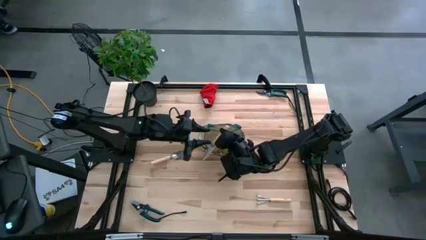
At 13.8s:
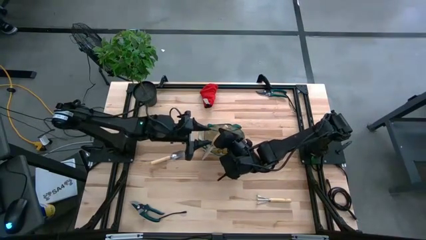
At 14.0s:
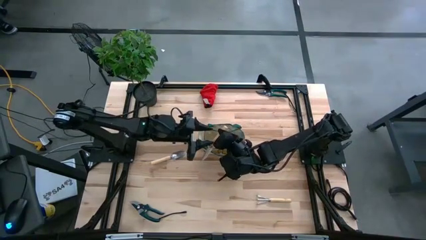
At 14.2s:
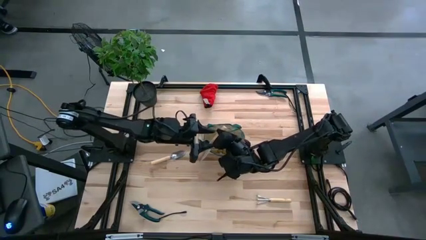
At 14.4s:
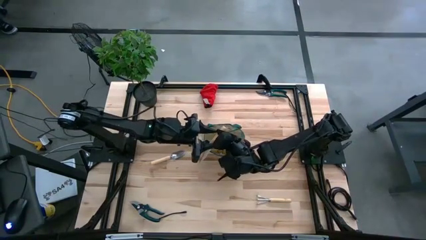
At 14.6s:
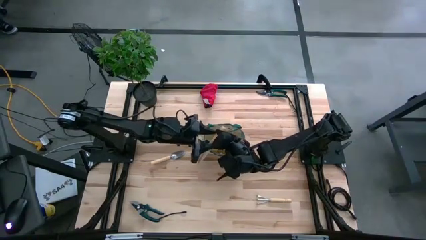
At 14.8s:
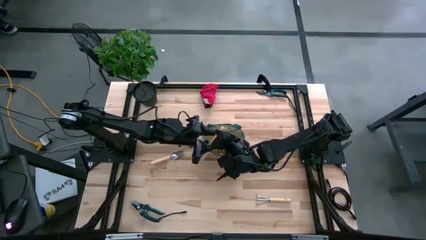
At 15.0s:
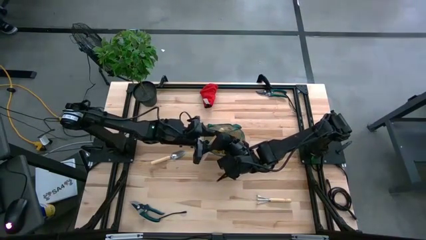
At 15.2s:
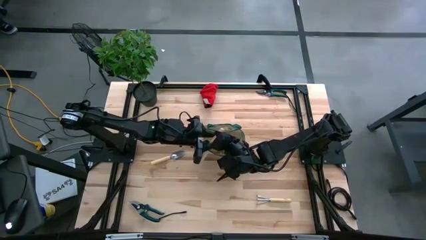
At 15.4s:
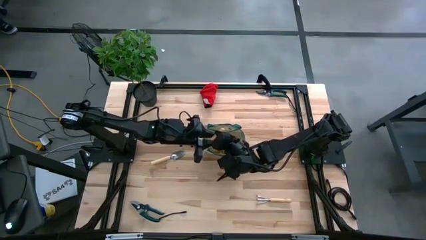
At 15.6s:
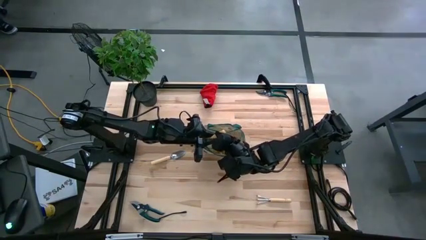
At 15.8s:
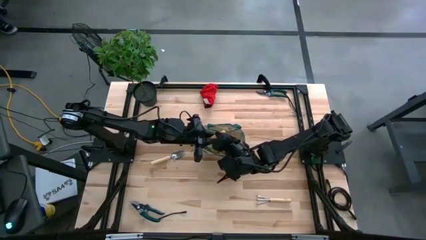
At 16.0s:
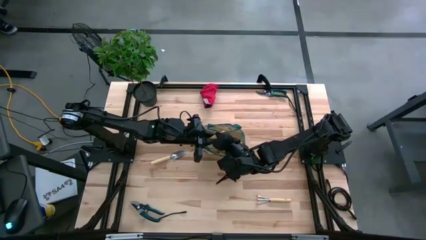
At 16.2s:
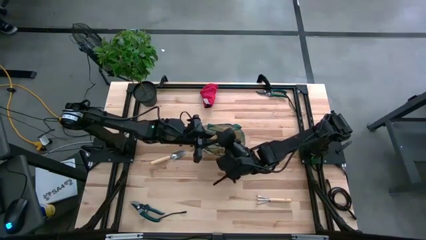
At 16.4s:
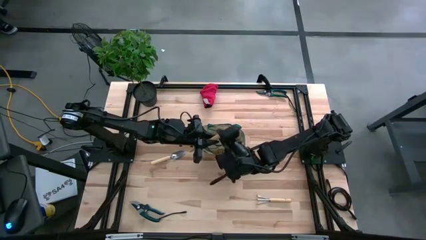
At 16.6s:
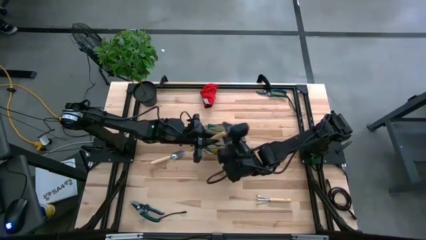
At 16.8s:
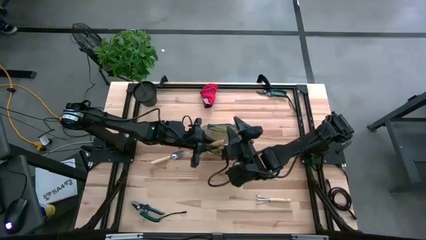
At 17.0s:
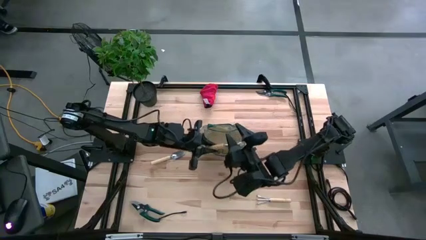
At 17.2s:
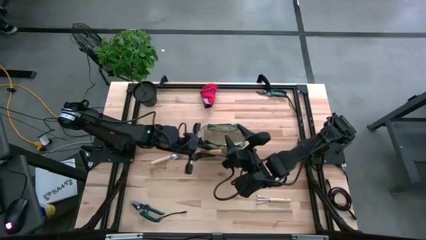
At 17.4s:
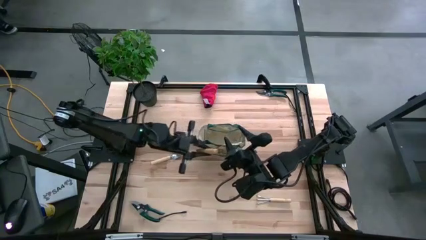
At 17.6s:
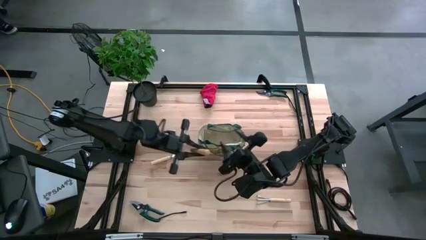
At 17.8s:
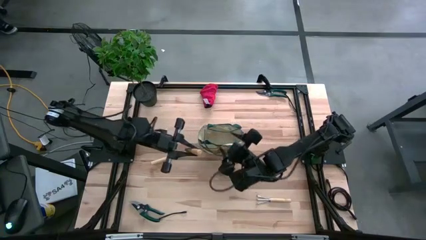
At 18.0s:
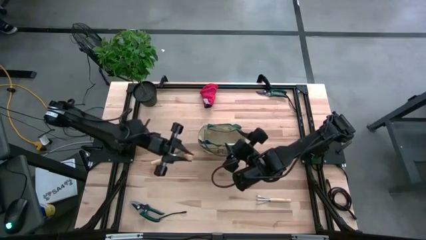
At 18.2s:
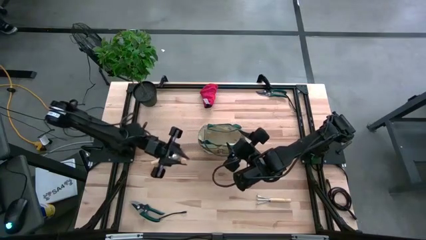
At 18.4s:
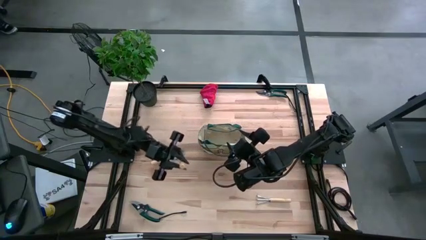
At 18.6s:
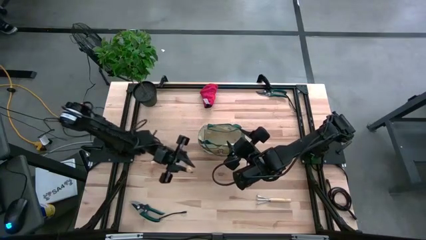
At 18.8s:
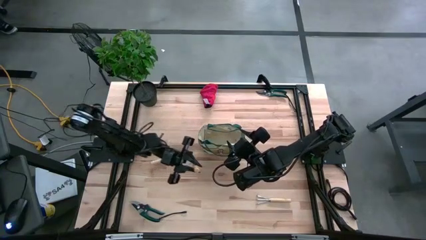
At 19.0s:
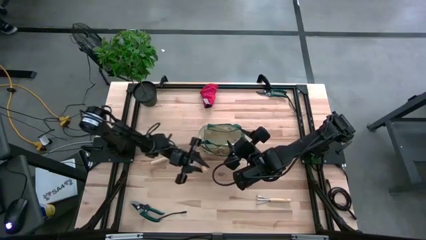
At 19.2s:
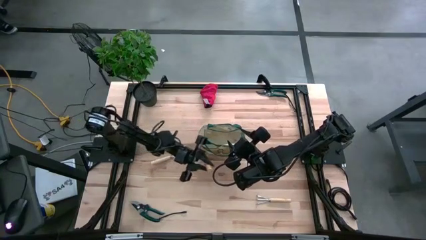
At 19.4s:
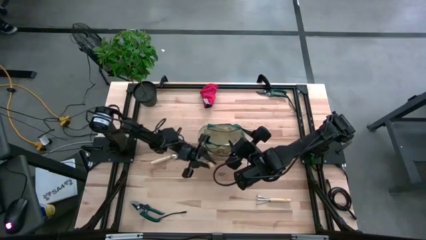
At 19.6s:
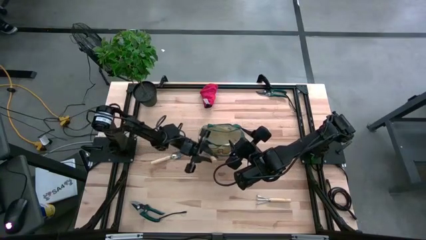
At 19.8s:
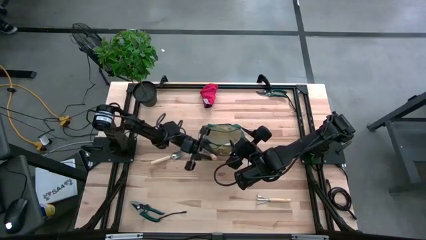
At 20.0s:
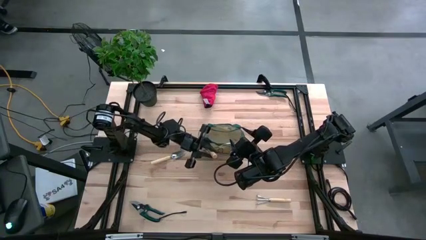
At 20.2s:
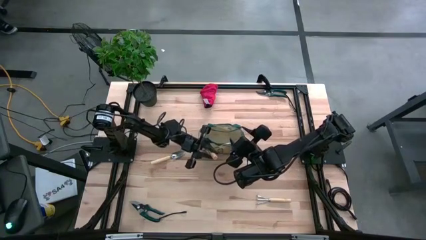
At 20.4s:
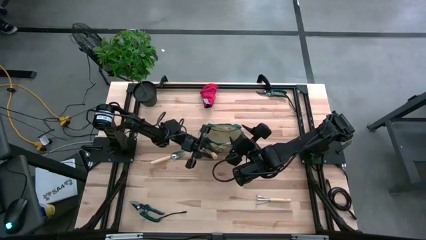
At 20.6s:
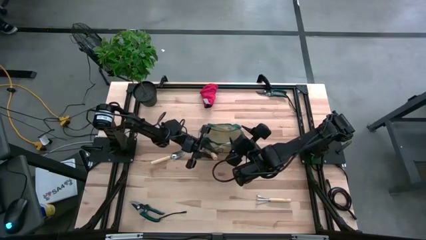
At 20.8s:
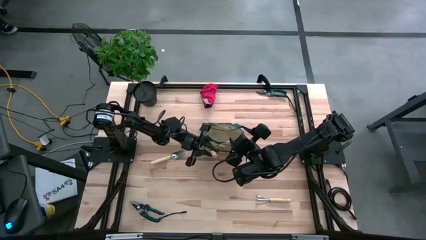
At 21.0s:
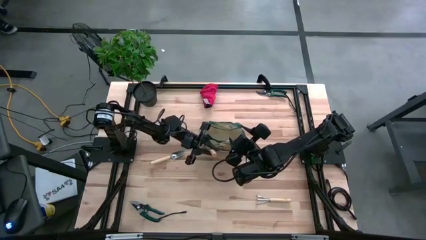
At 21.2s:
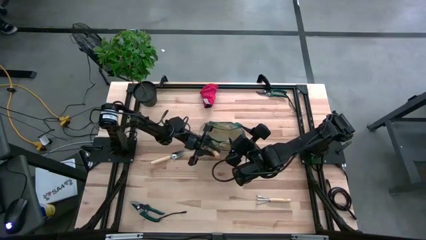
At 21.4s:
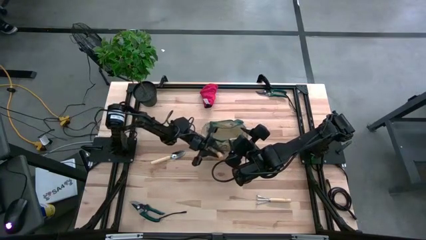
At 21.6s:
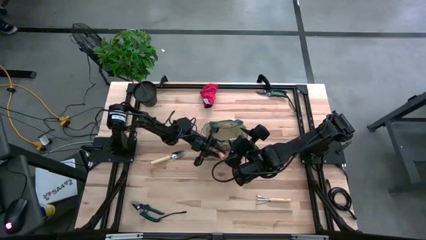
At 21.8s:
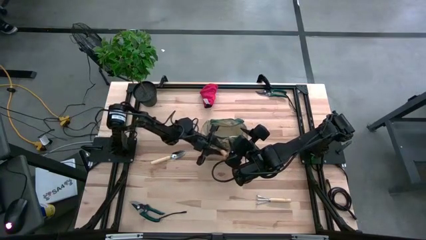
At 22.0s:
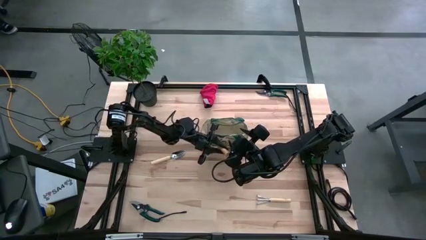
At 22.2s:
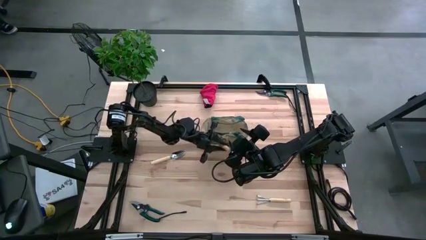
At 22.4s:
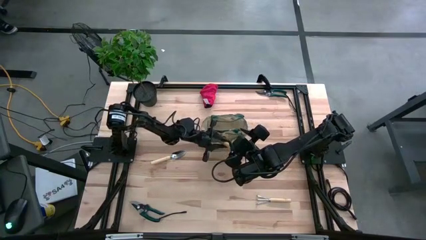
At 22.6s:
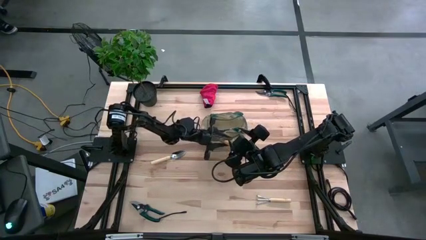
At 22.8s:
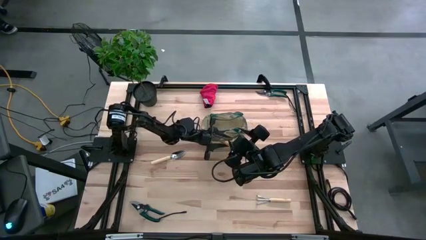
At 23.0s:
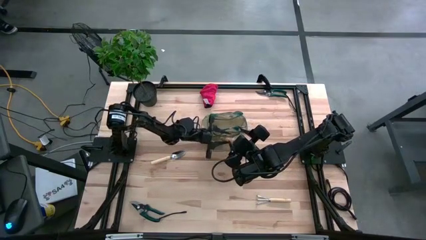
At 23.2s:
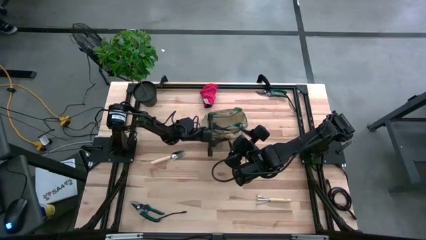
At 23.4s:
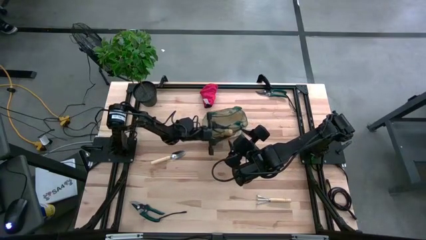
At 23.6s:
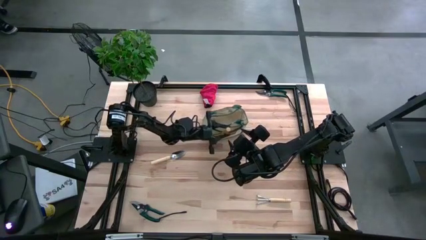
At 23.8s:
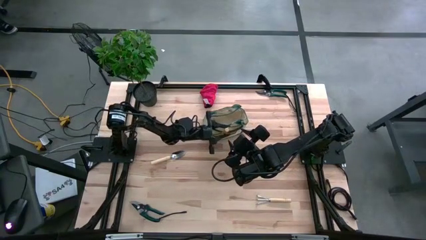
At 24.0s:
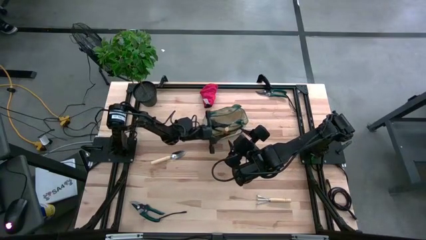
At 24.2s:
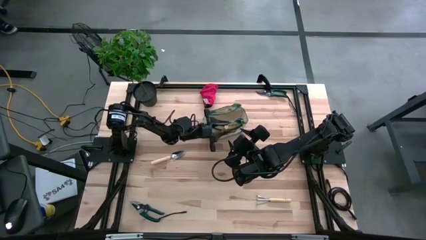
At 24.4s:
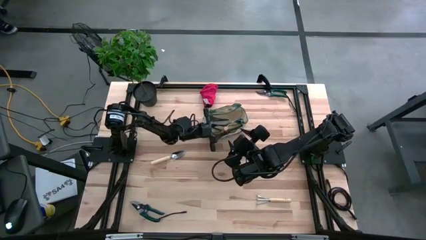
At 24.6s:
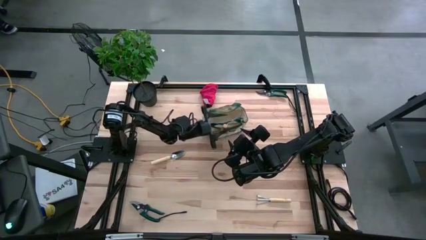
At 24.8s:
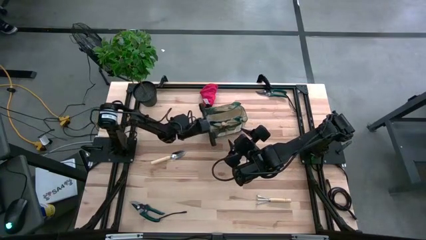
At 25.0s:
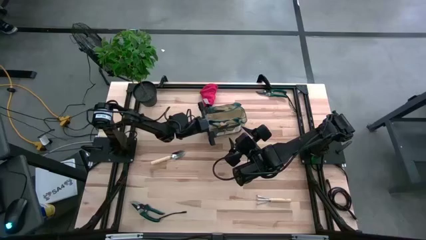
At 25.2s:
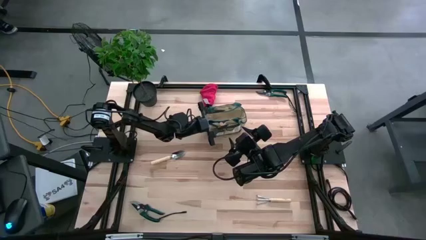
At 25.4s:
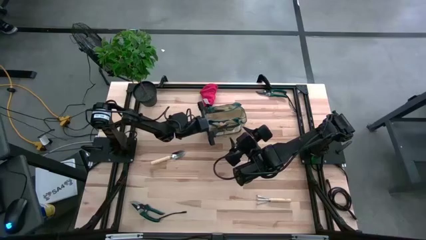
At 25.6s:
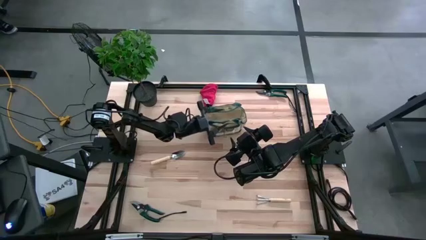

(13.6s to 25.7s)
Task: Pick & Place Garden tools in Gardening bag
Put the right trowel into the gardening bag
